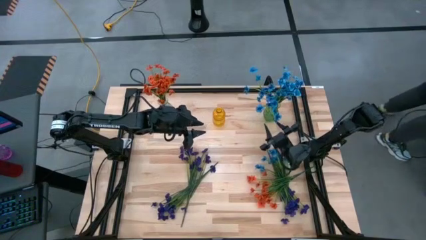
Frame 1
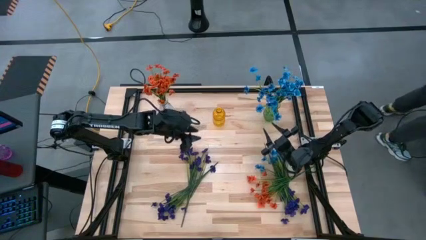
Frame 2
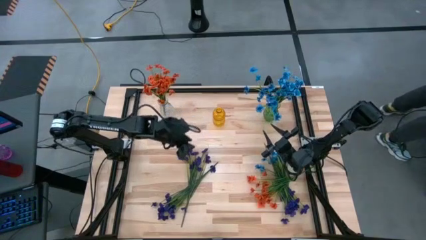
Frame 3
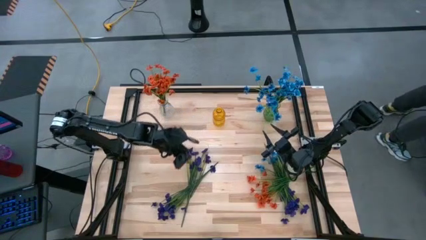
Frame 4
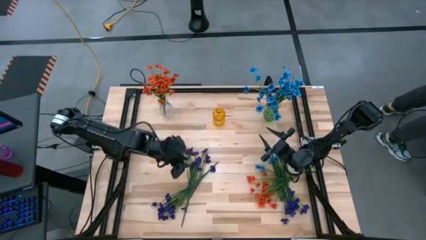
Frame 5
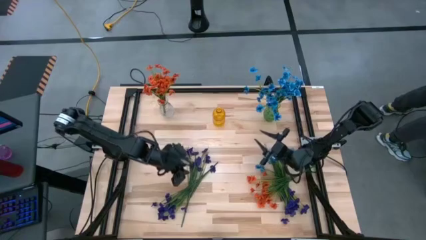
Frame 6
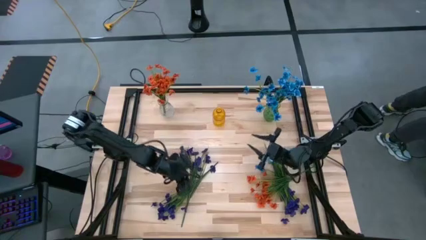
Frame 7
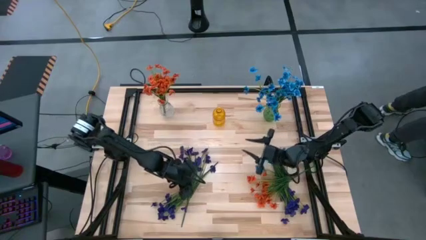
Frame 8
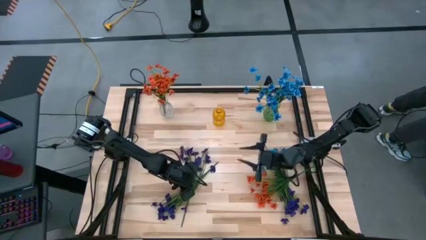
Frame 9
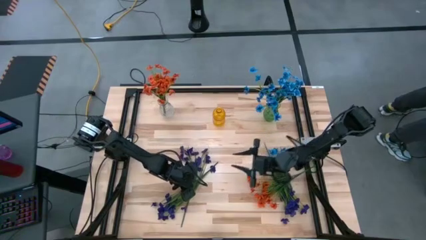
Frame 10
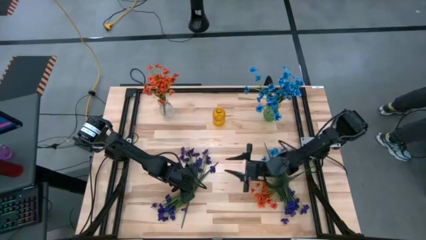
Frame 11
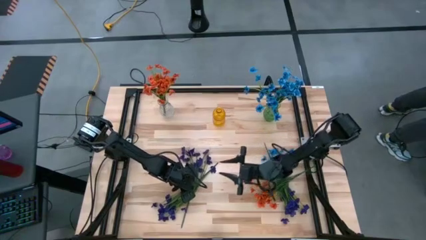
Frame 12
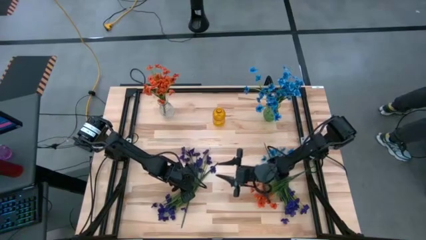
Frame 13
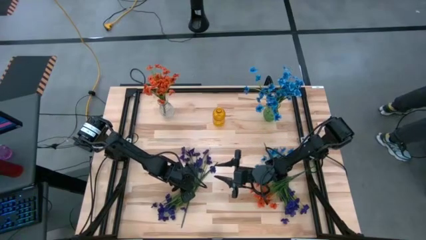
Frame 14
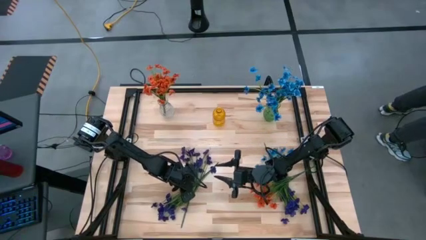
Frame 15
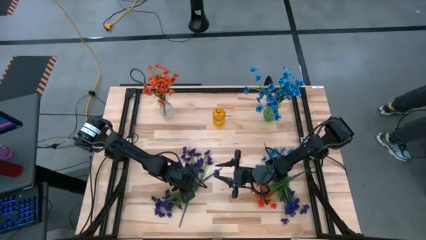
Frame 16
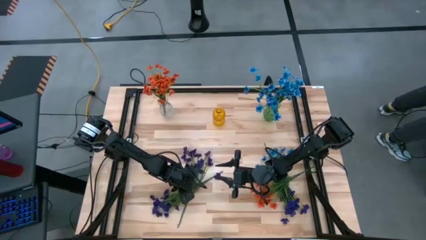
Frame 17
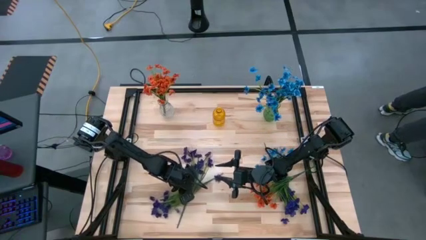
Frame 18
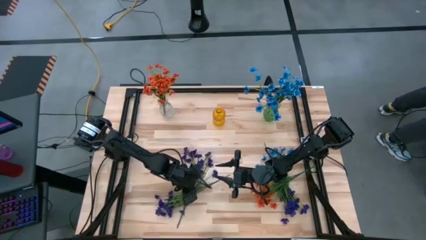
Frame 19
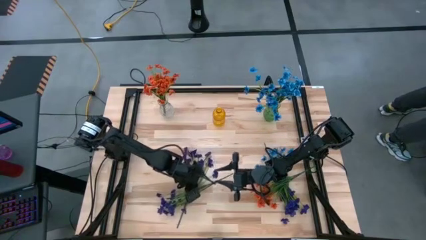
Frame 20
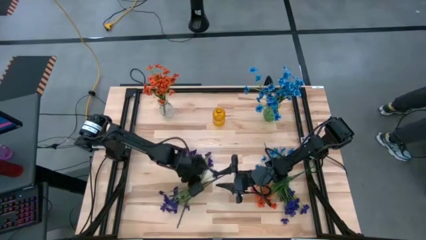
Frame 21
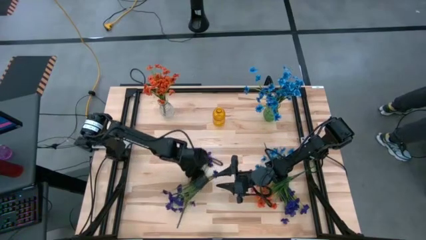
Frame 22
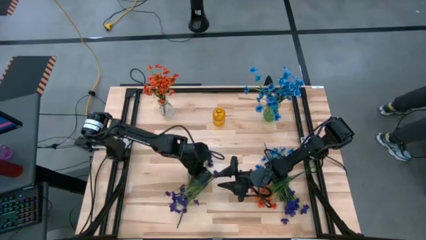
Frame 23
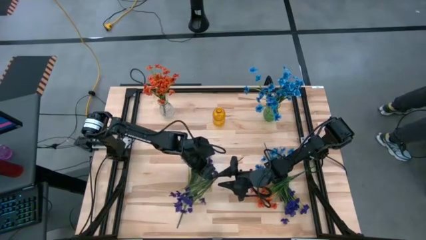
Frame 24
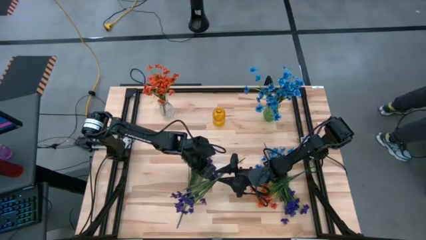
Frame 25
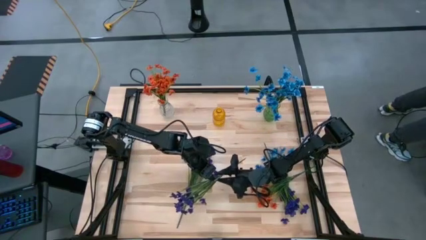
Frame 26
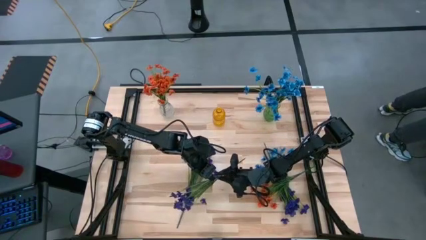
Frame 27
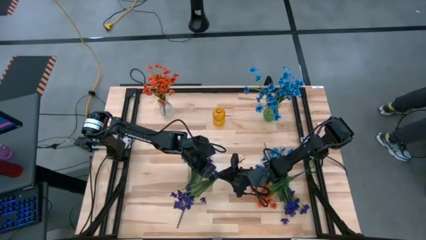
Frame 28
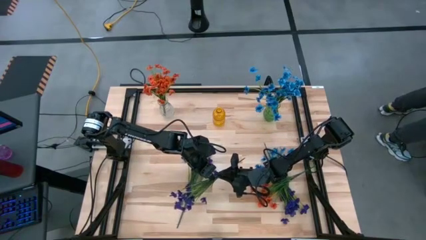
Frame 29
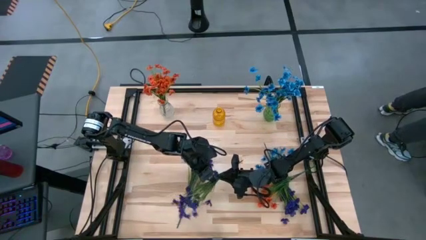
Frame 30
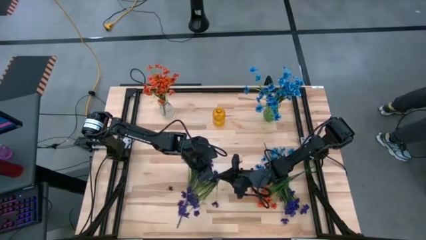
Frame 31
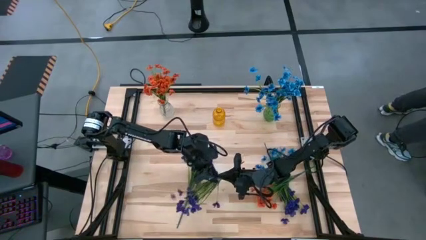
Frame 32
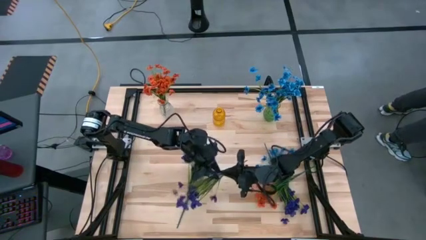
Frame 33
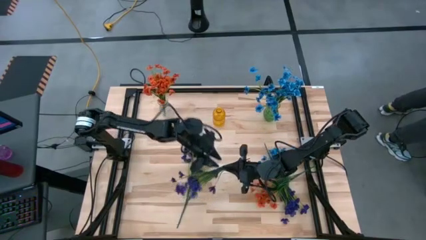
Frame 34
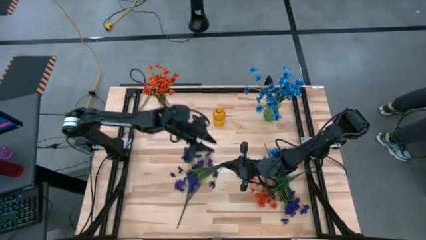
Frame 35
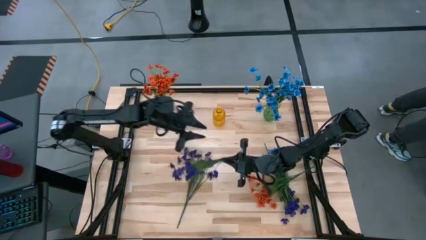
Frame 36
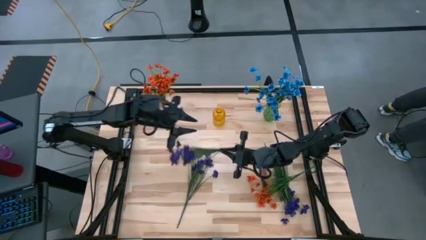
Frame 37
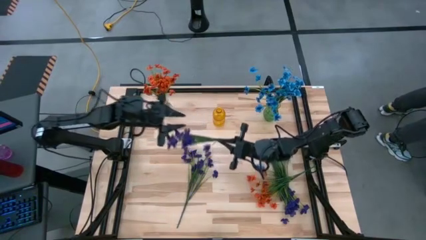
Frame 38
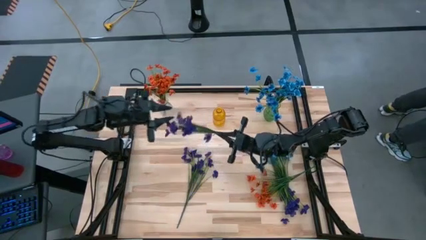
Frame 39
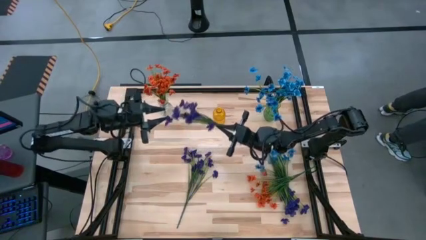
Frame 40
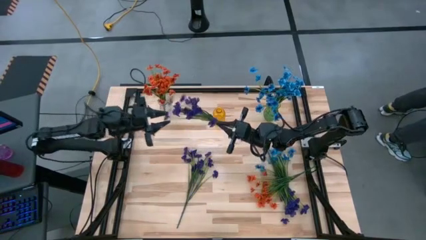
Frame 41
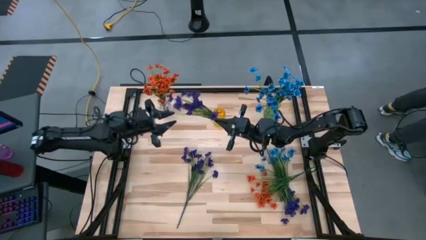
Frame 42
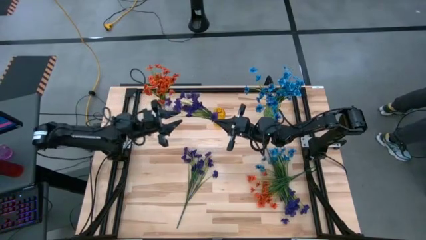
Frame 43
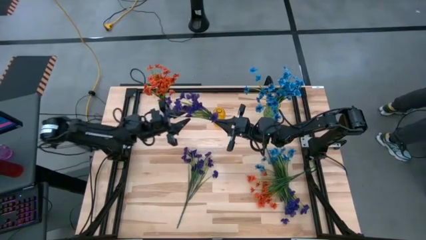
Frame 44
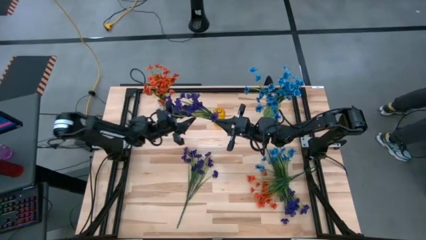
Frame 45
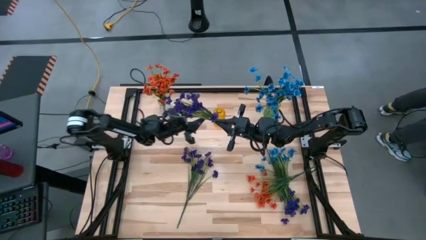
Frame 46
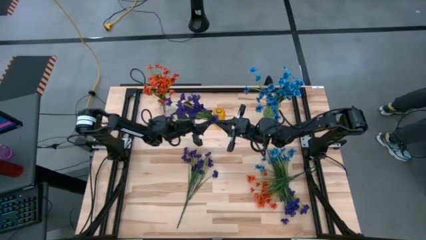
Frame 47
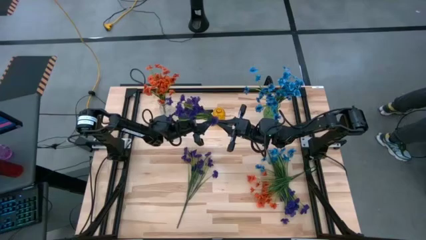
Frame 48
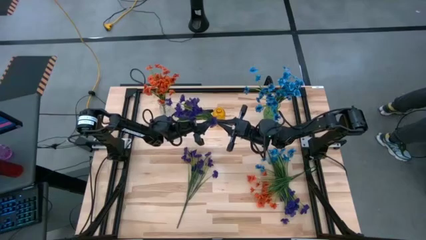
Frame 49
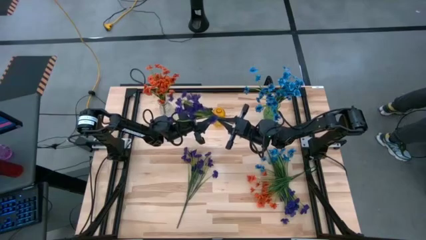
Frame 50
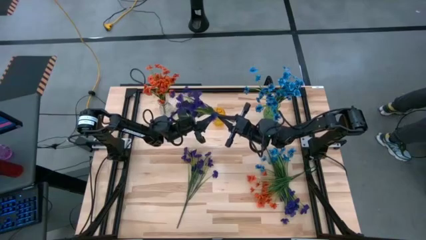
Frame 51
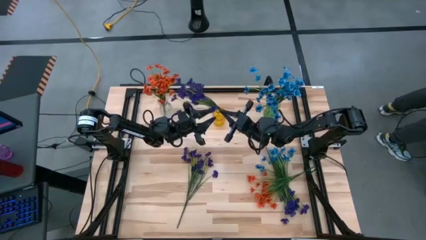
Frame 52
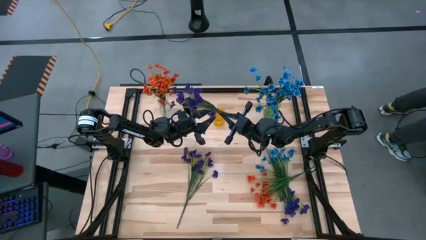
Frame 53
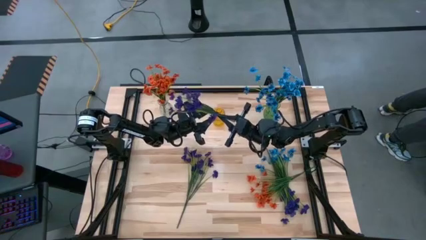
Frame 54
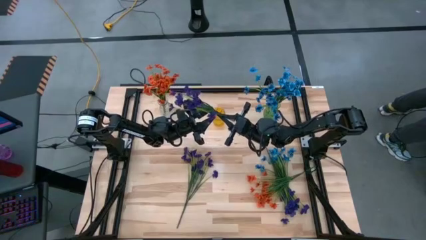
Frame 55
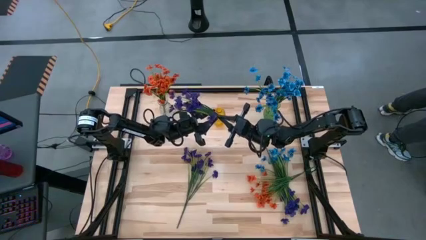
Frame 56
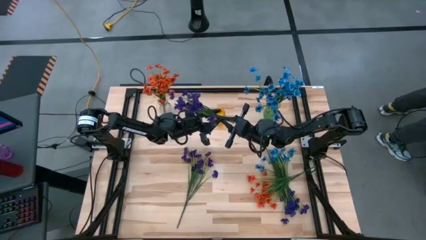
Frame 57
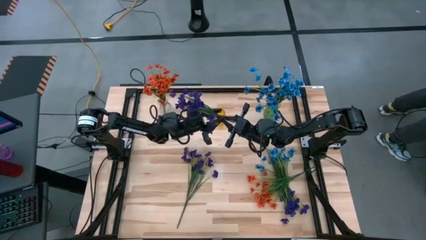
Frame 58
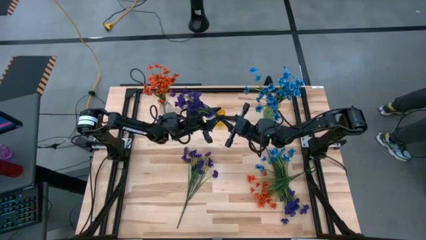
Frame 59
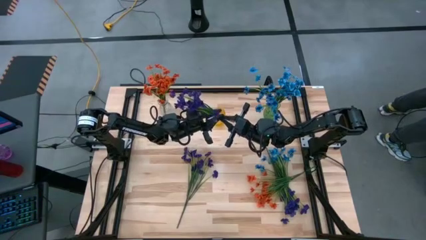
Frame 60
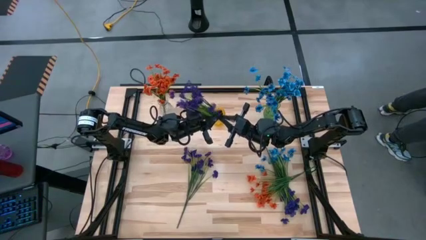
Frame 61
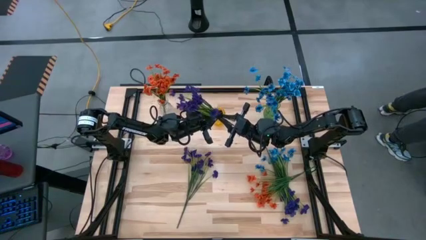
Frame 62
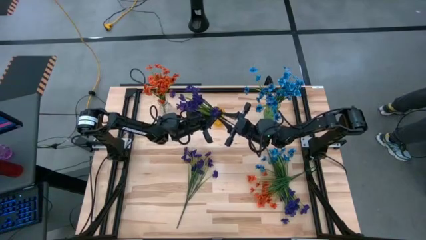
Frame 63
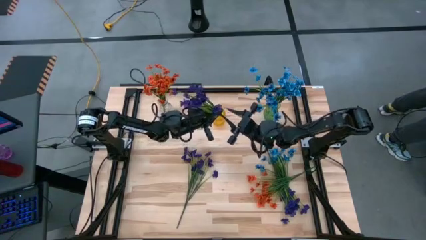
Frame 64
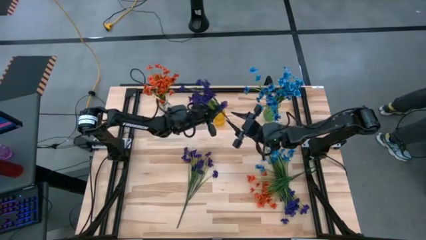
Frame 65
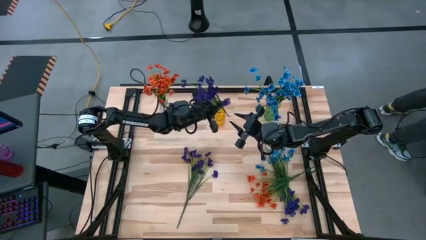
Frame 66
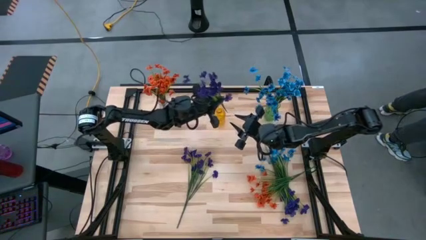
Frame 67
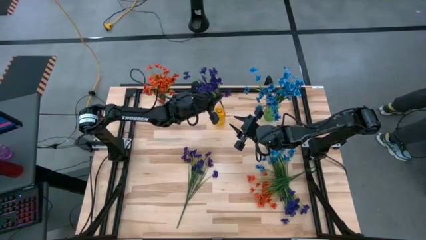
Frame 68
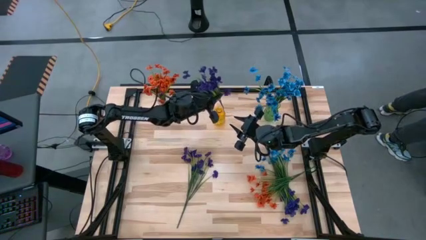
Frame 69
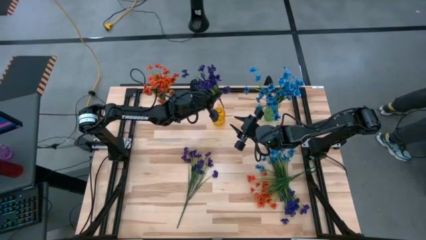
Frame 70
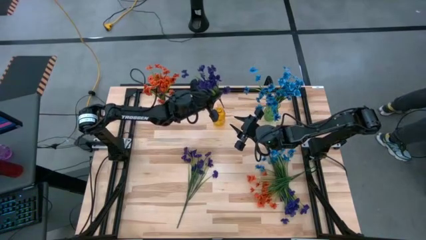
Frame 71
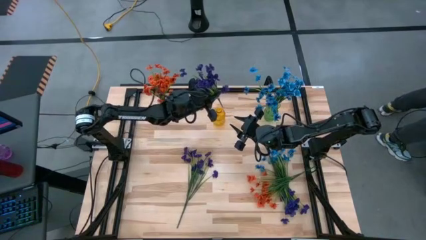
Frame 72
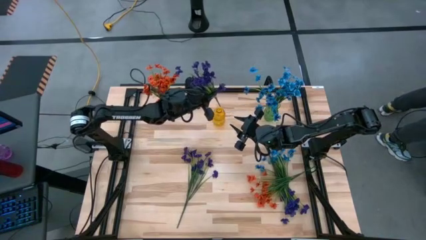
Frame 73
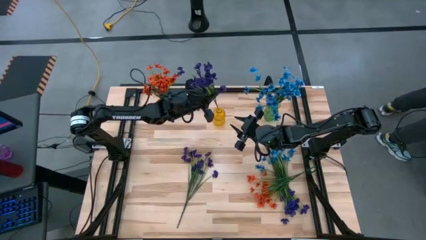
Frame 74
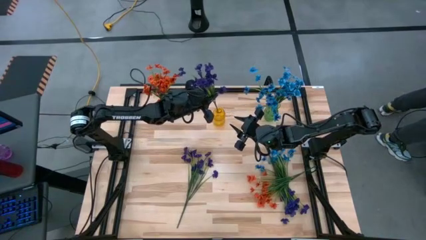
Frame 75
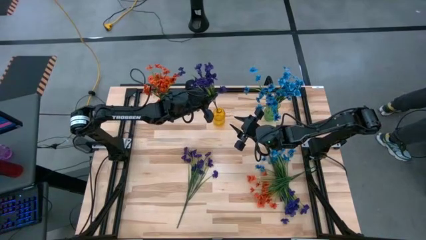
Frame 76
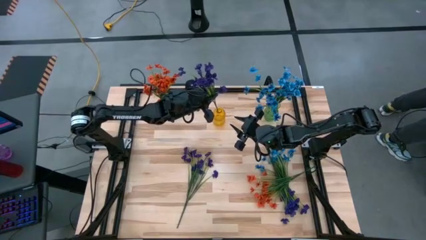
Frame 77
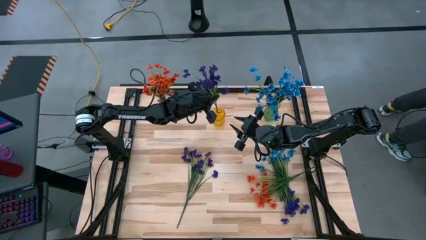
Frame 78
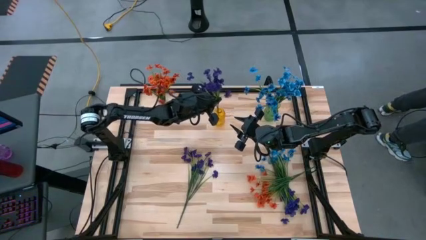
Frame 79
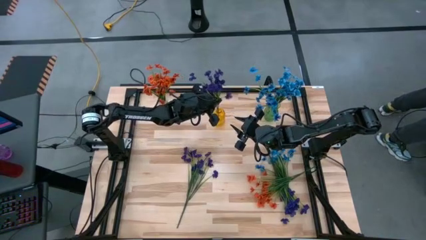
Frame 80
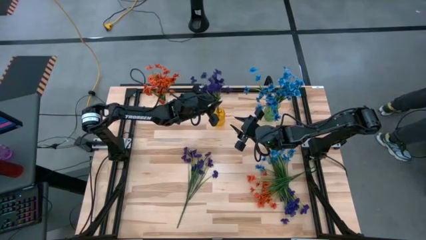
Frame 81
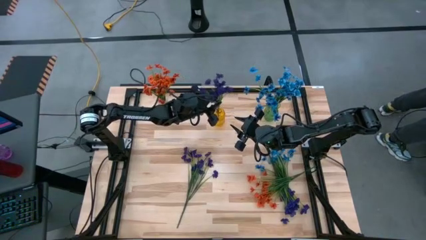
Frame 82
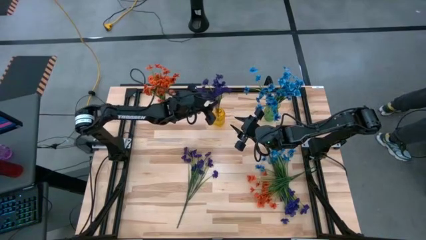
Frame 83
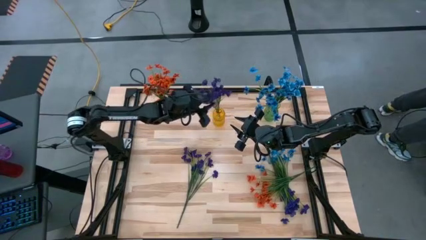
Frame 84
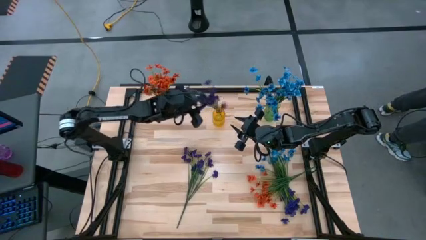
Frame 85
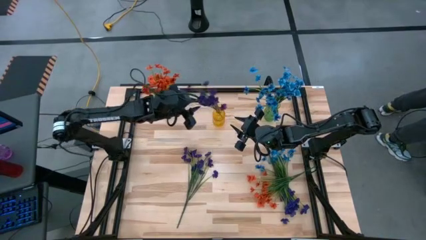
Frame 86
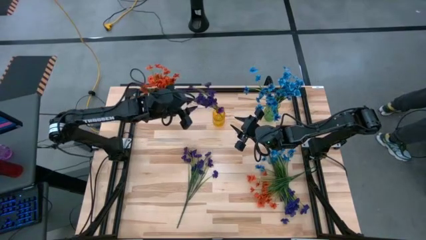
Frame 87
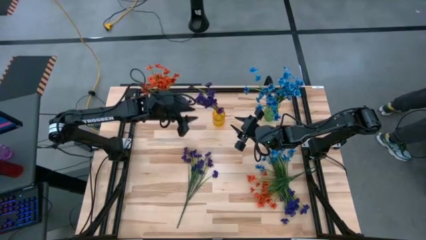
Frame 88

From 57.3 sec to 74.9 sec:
Task: Sort flowers into vase by color
Put the purple bottom left flower into the orange vase
